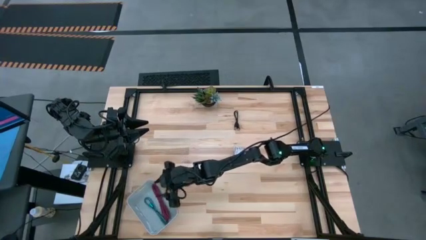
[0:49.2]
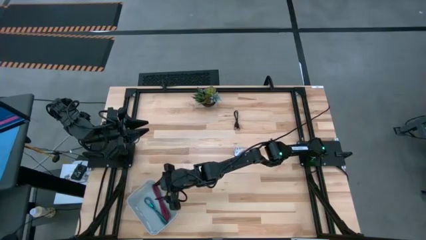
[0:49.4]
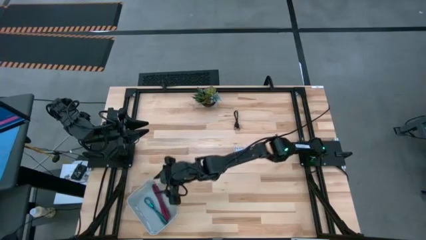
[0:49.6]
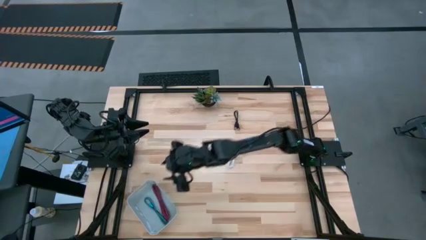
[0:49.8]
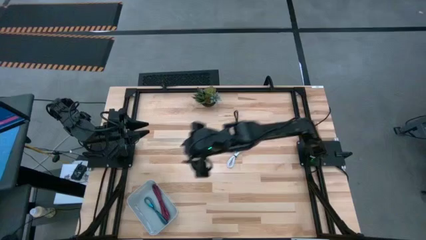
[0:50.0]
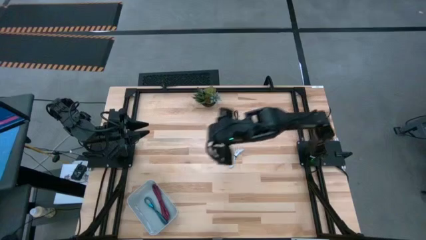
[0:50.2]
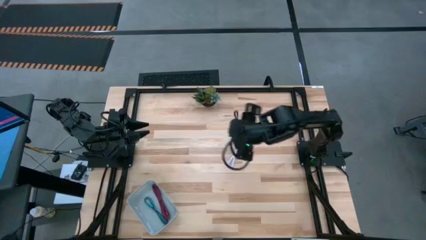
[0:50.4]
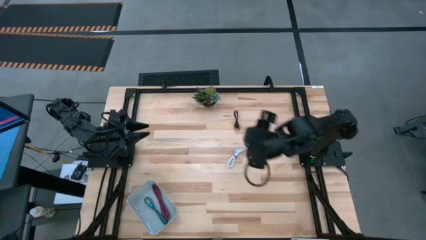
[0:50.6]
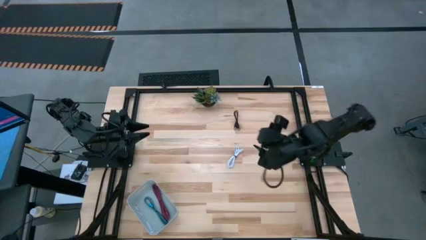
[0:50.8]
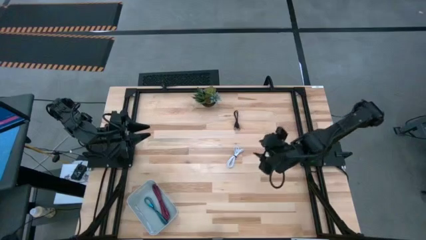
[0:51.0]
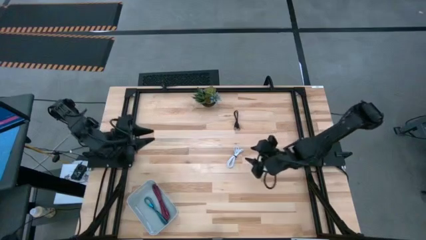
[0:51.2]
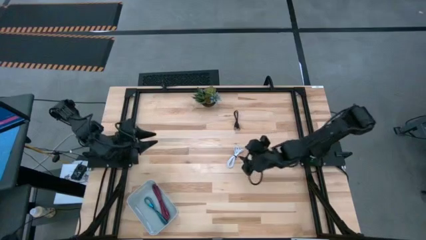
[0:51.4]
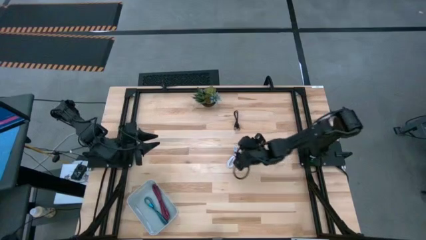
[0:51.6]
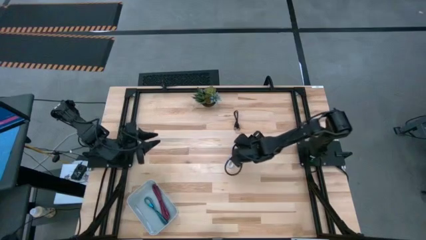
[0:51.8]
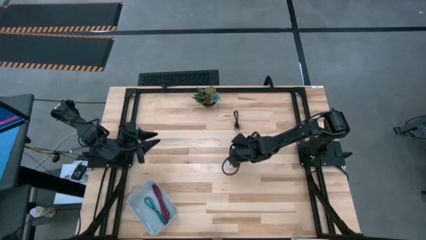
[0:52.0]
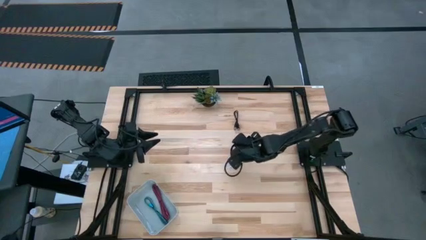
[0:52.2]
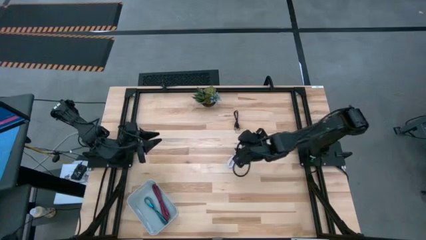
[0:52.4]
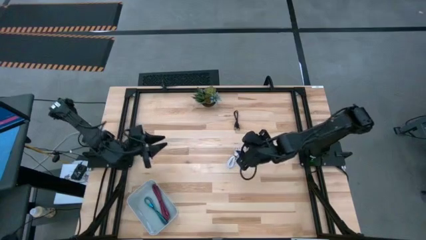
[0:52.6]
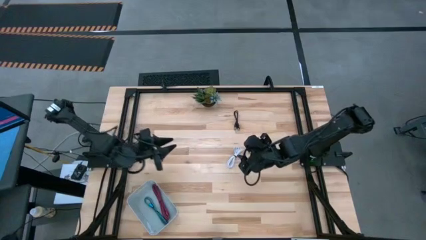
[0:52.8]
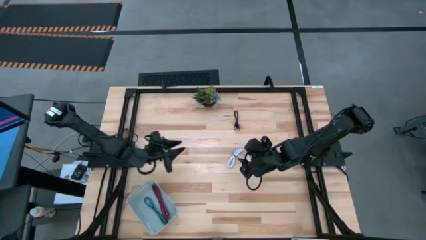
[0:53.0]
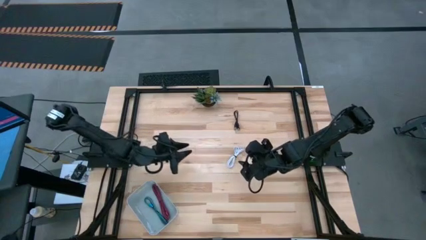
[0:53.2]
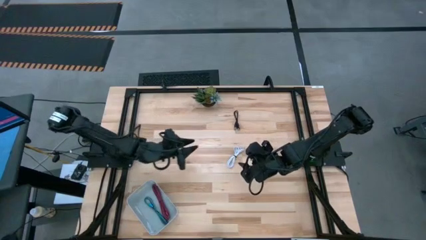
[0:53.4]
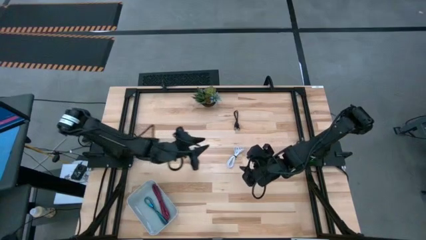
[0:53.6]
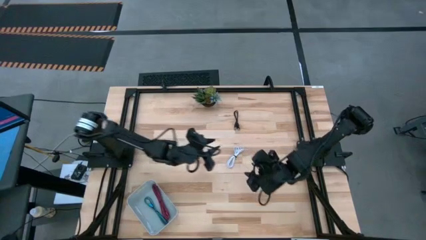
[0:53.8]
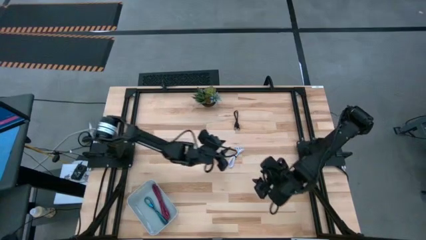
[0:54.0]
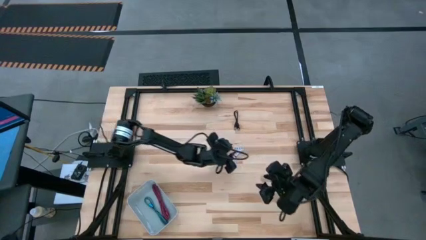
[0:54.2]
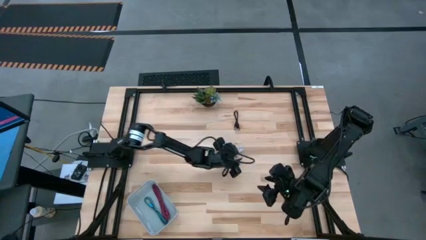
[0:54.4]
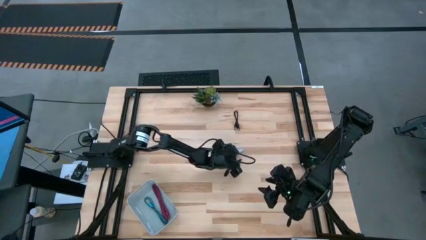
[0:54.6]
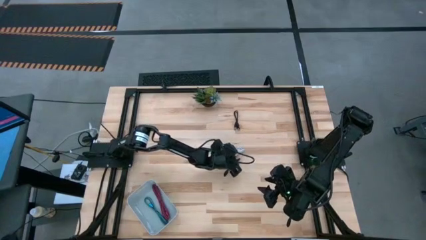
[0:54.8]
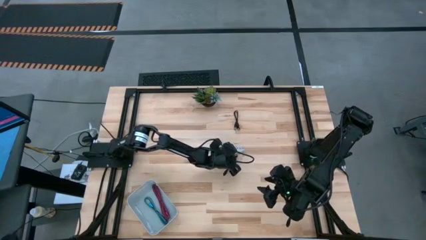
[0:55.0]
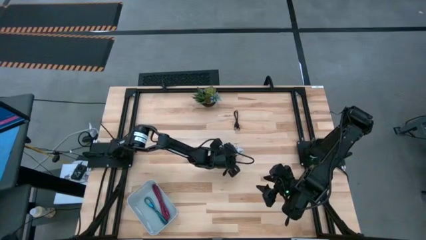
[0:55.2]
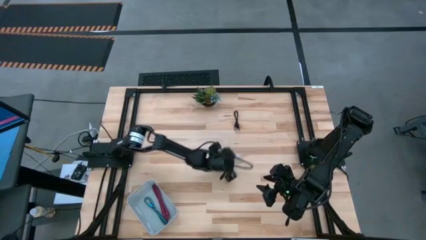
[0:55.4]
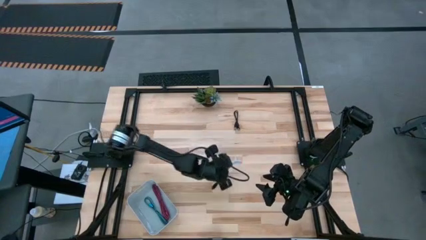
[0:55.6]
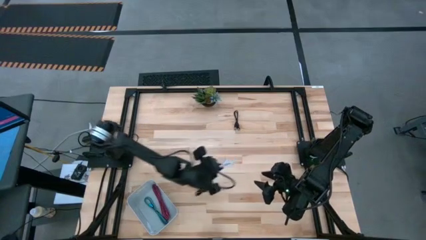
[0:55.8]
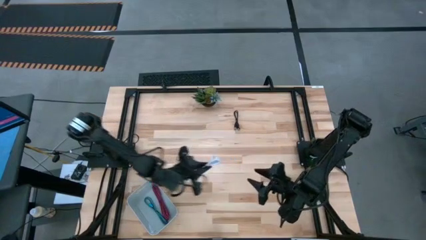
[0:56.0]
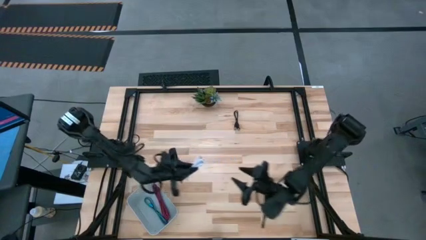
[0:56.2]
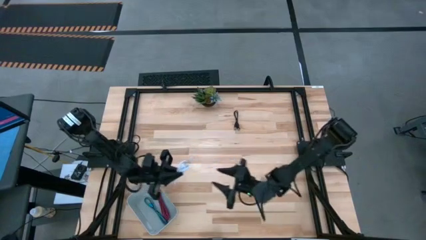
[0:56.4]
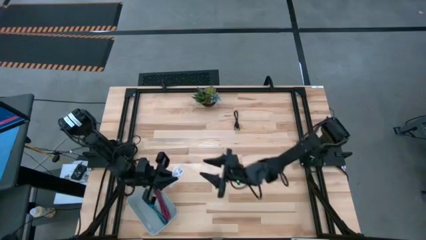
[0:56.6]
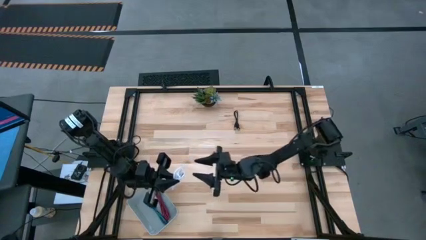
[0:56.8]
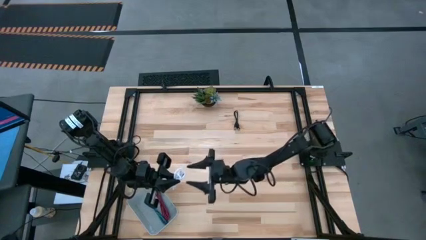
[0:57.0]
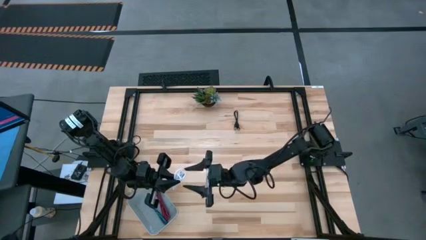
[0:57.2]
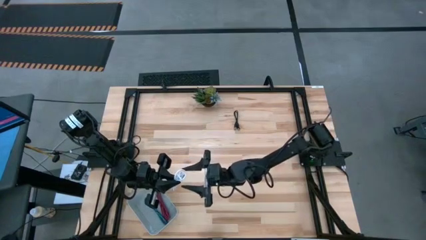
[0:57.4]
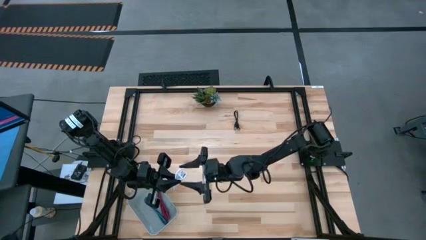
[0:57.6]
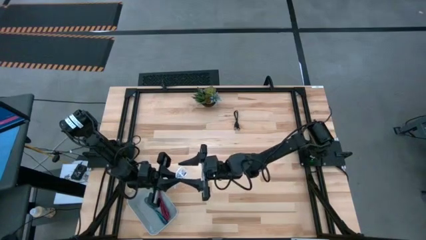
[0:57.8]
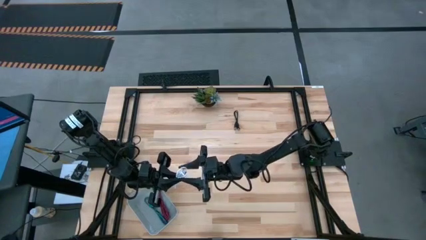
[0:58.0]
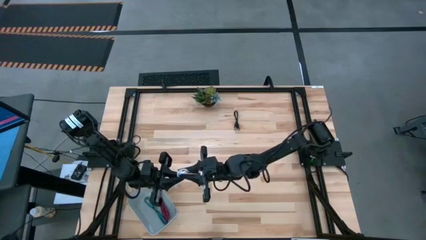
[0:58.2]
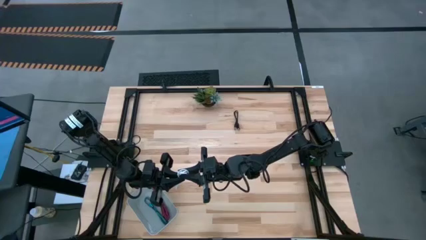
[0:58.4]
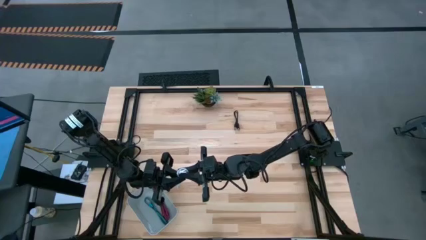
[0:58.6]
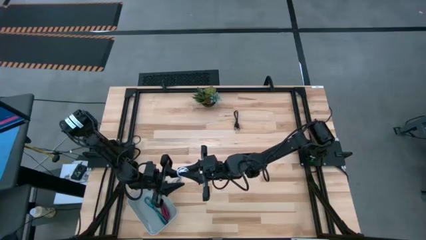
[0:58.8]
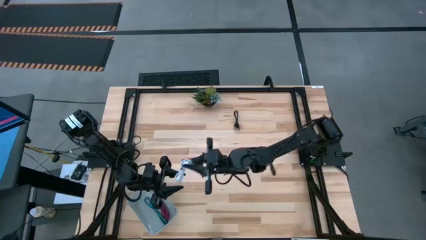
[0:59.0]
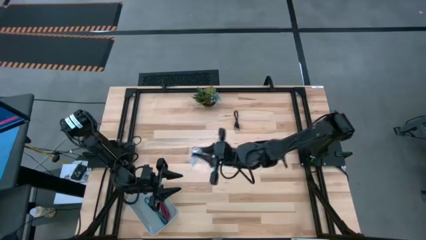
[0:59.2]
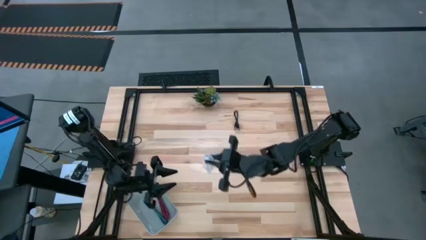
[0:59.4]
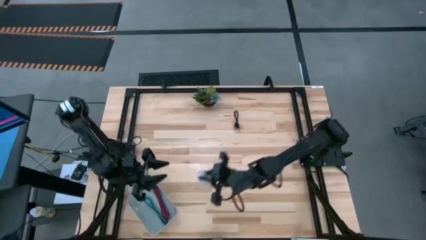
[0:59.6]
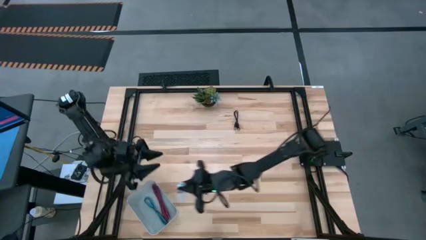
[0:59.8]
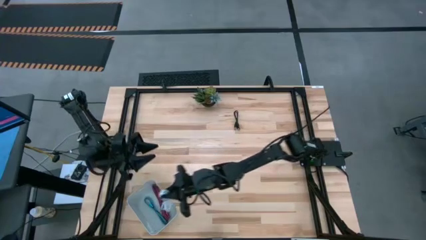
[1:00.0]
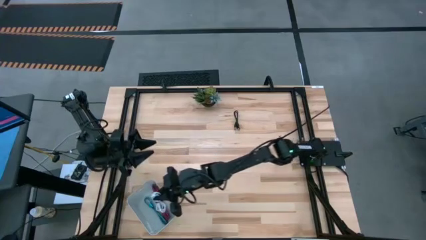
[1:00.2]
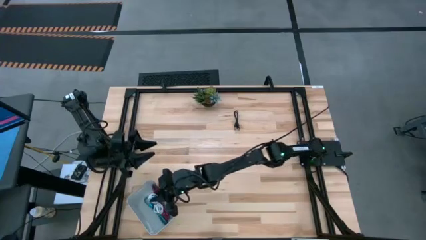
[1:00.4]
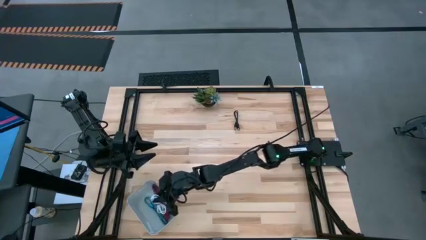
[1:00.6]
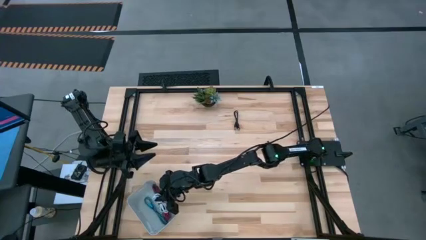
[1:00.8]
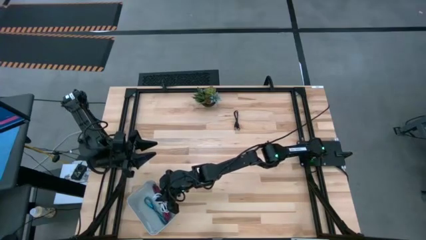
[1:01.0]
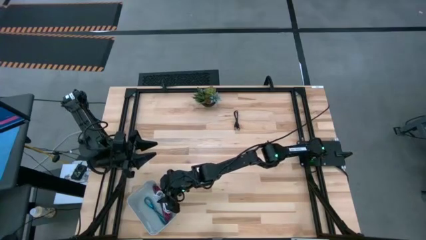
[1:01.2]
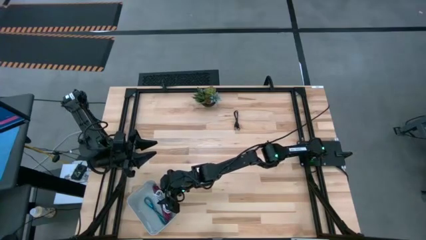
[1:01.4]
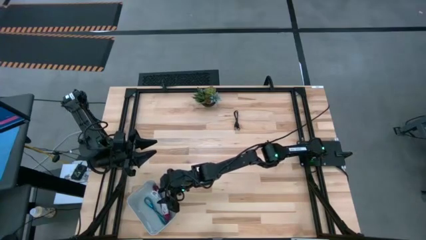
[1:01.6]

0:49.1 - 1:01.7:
Task: Pick and place USB-C Cables
Put the white charger cable into the gray bin

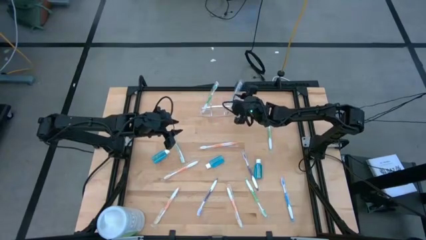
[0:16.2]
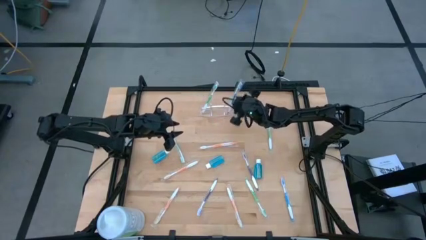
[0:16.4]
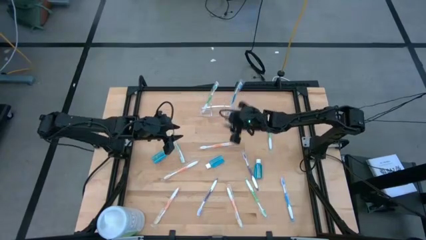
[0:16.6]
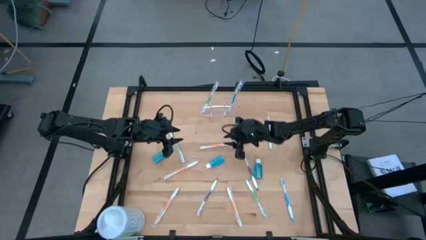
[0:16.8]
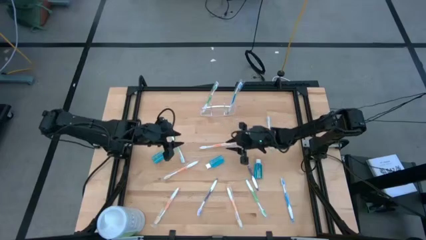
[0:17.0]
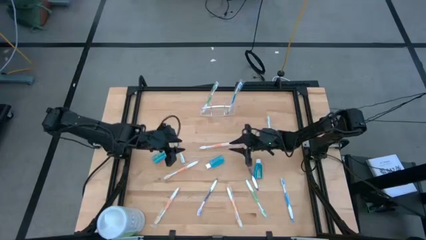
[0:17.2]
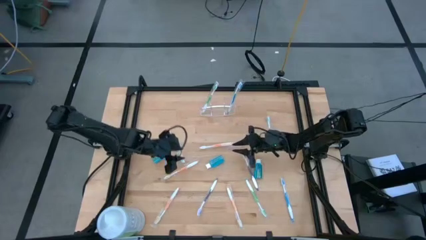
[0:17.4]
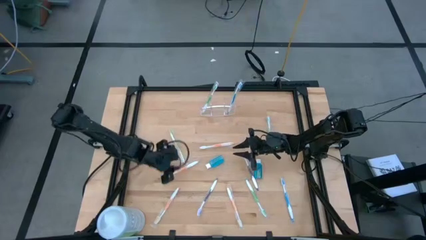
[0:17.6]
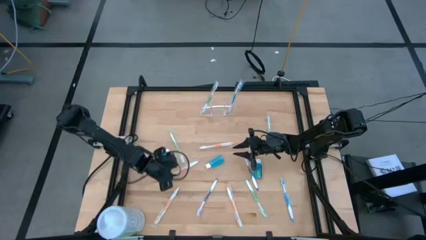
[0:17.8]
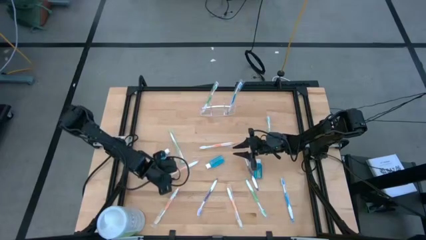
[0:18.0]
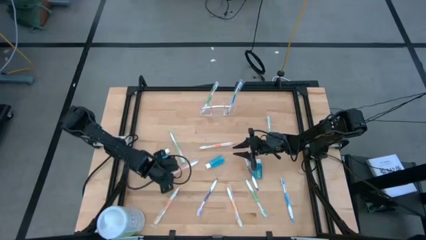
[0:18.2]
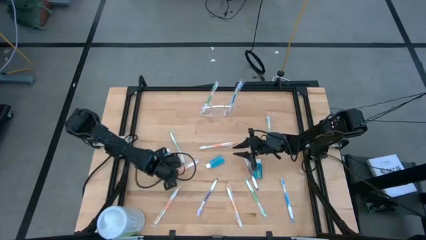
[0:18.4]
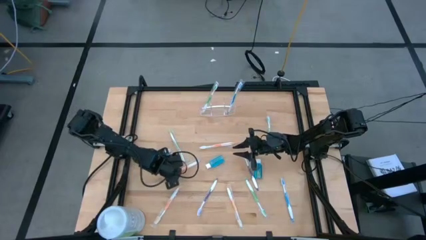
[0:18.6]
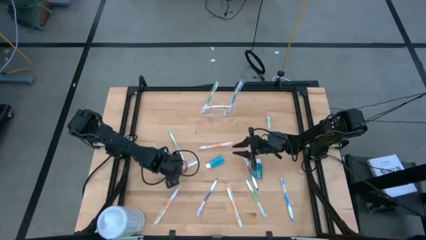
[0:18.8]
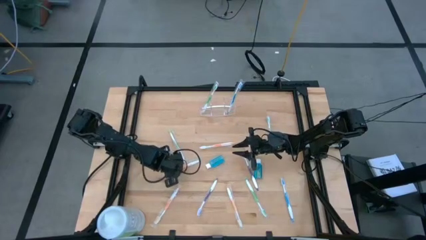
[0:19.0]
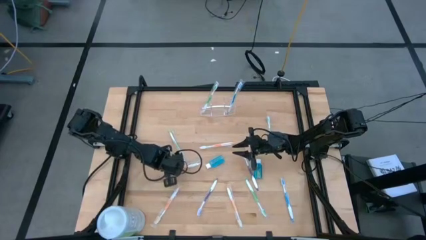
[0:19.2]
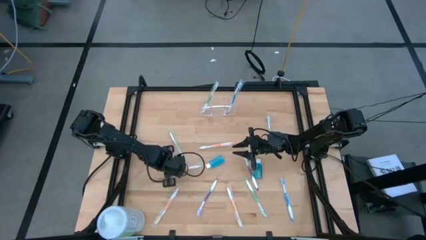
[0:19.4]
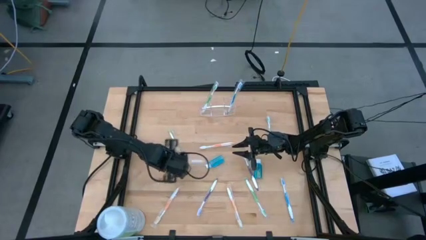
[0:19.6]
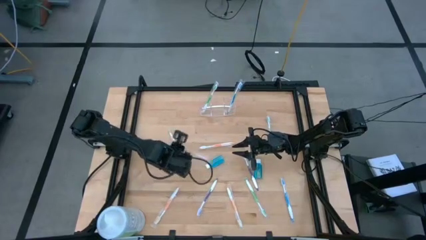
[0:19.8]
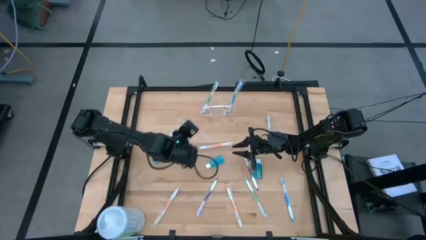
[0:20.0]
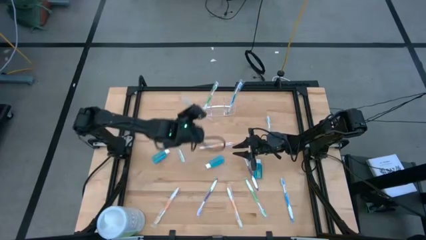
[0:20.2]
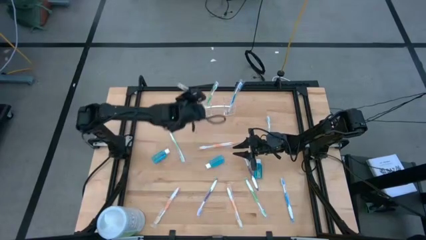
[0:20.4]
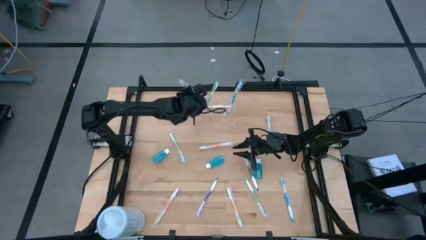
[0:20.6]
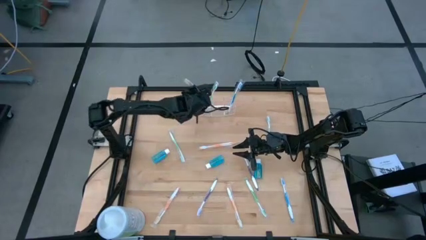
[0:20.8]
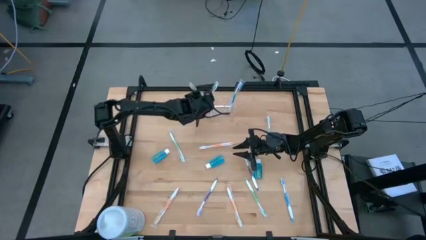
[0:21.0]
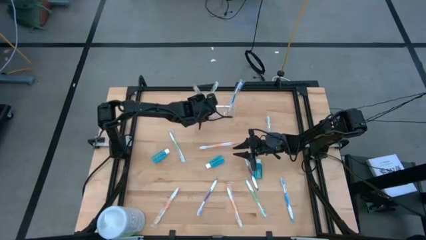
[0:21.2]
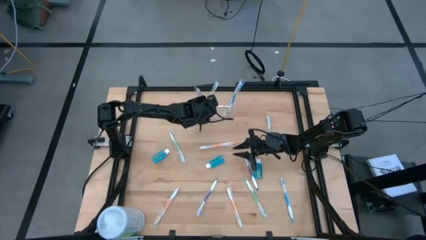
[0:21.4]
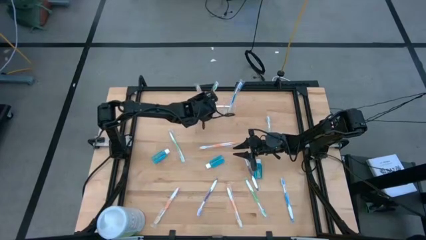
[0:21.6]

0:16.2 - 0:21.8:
Task: Pick & Place toothbrushing station
Put the orange toothbrush into the transparent organizer
